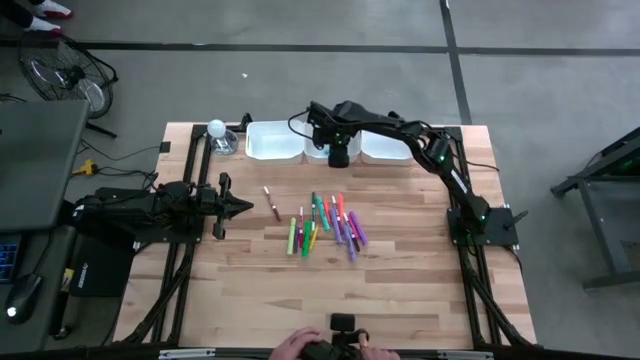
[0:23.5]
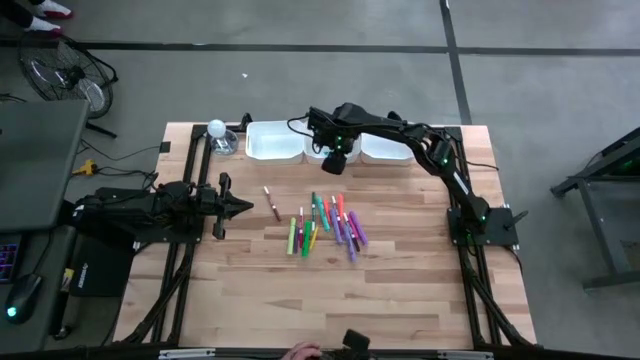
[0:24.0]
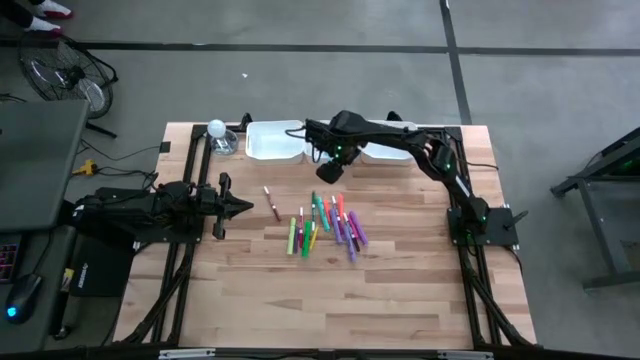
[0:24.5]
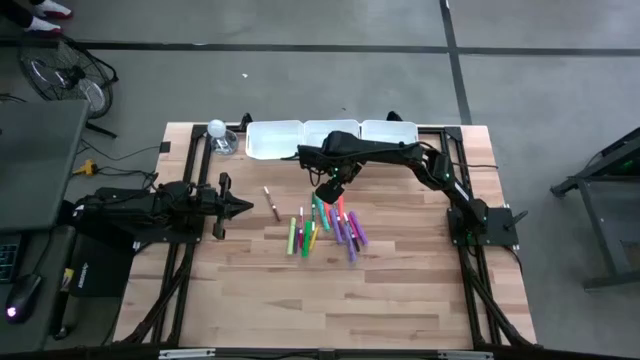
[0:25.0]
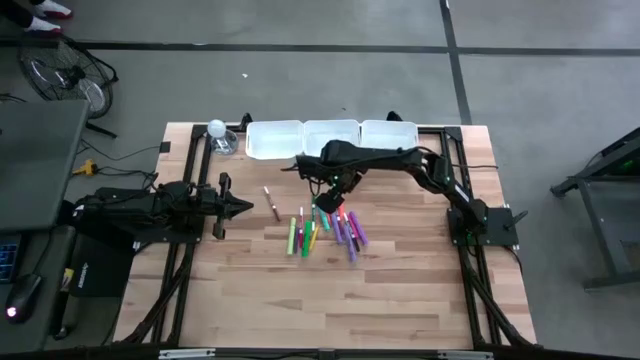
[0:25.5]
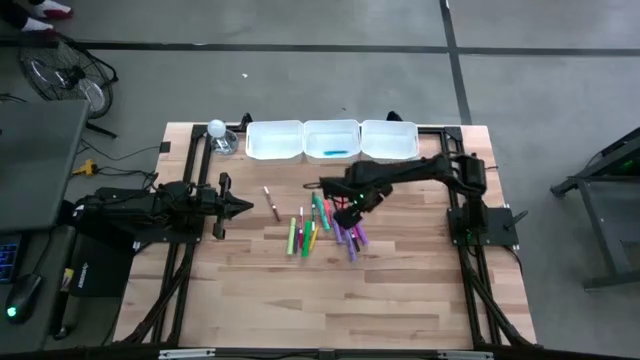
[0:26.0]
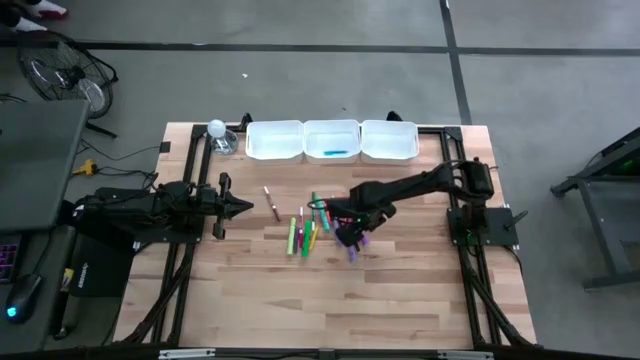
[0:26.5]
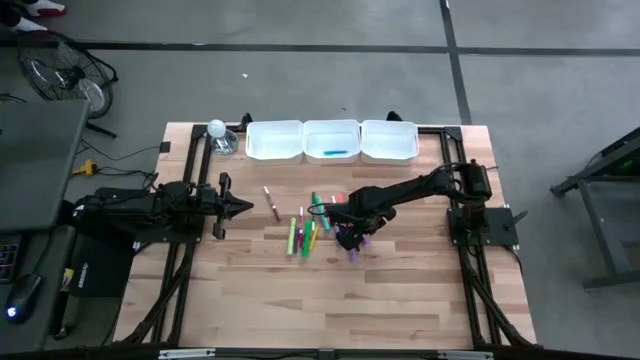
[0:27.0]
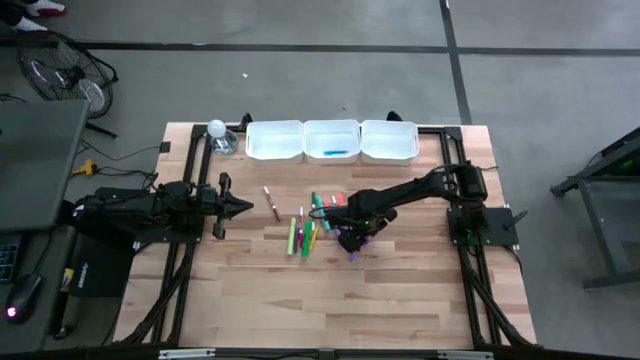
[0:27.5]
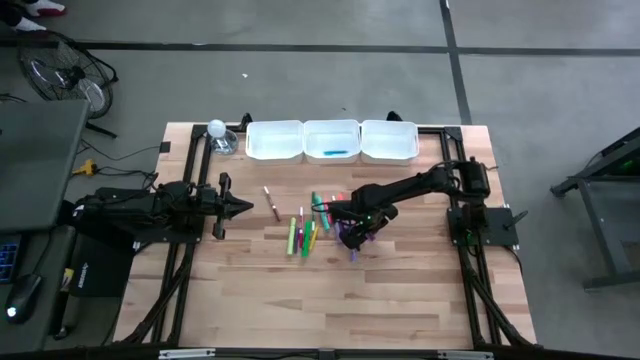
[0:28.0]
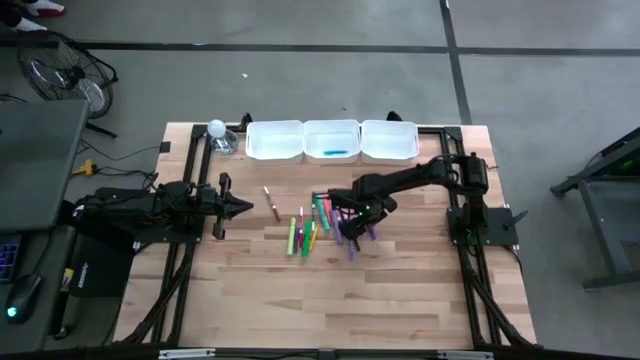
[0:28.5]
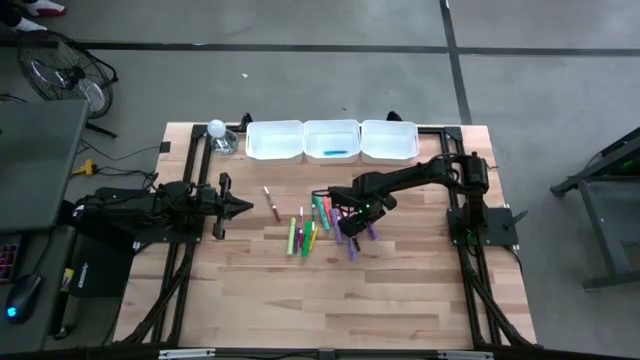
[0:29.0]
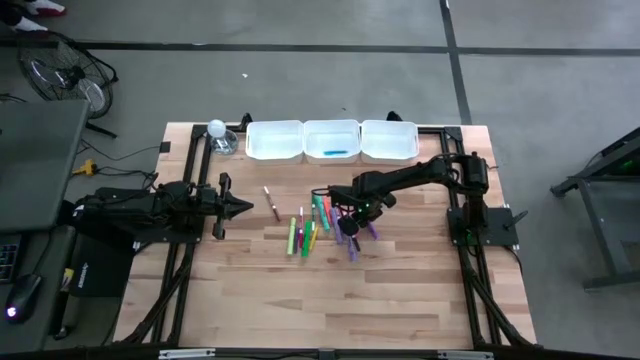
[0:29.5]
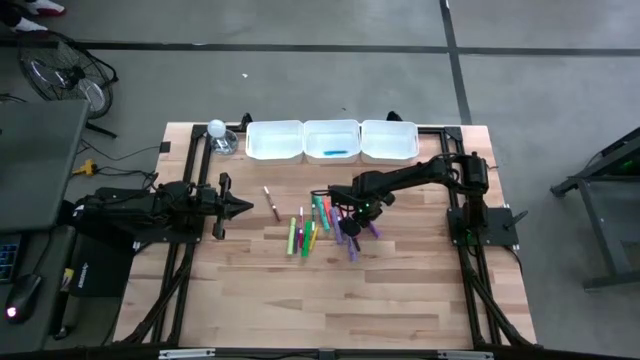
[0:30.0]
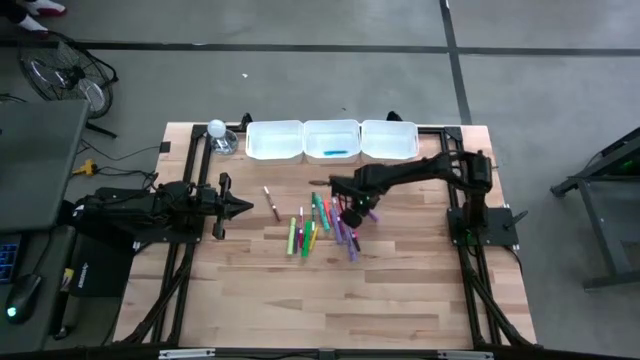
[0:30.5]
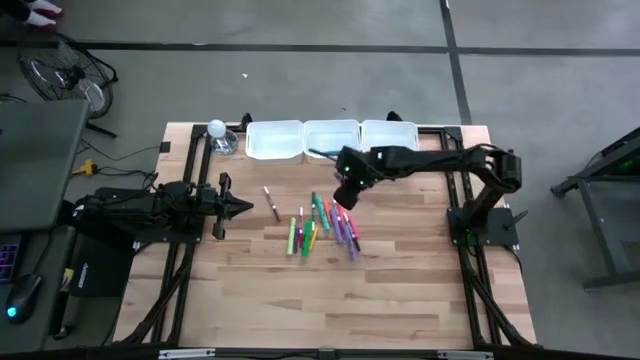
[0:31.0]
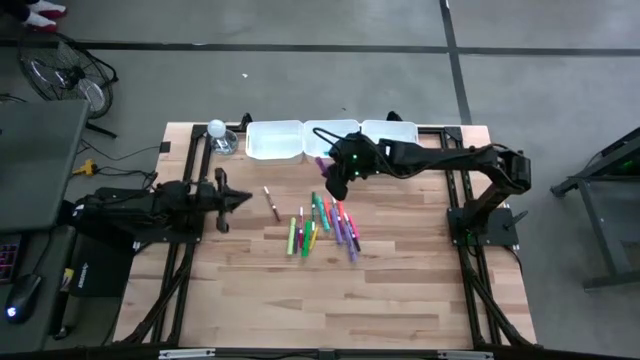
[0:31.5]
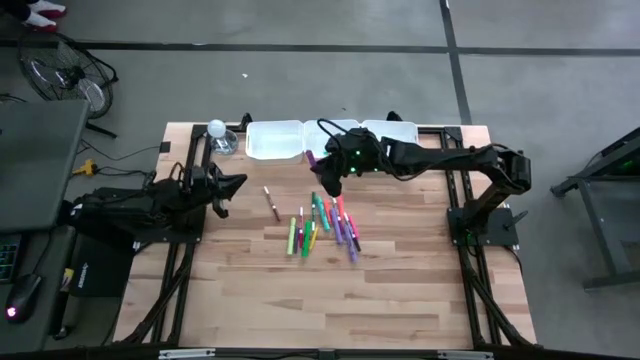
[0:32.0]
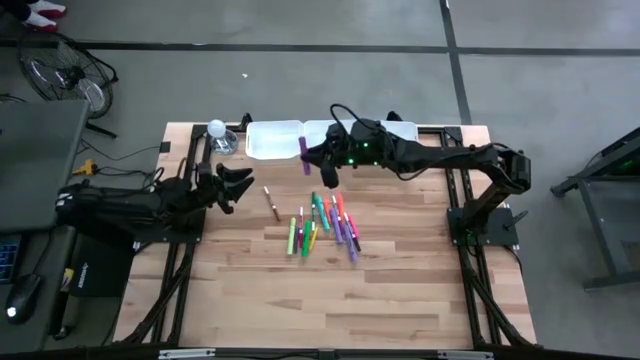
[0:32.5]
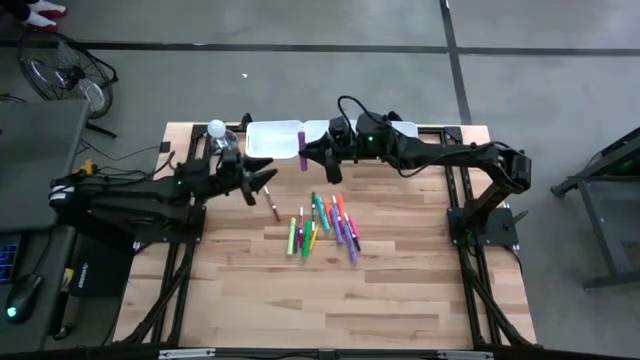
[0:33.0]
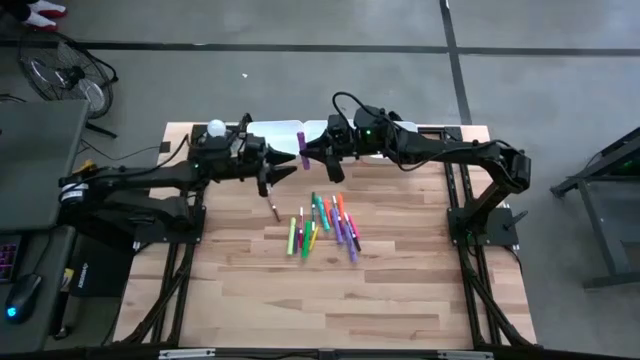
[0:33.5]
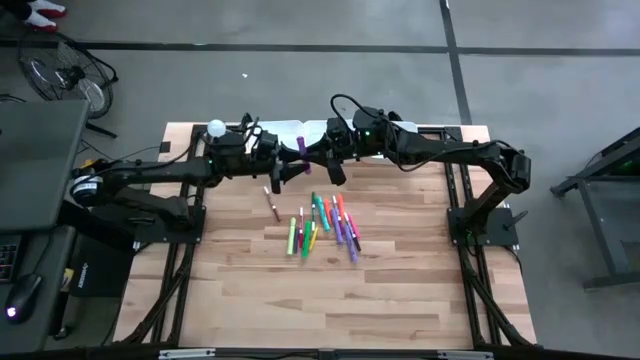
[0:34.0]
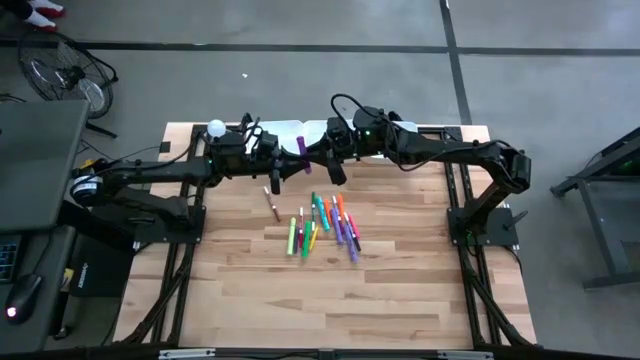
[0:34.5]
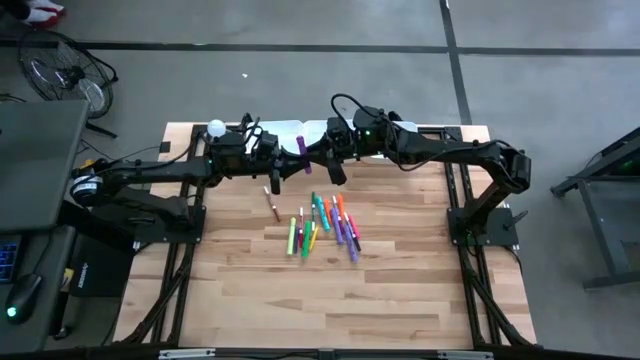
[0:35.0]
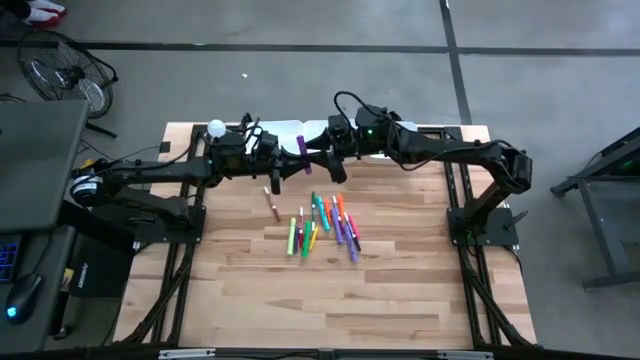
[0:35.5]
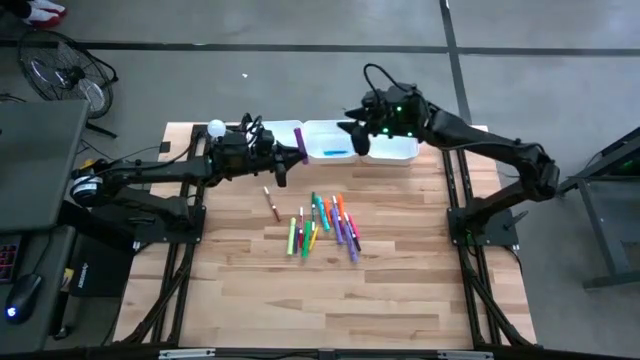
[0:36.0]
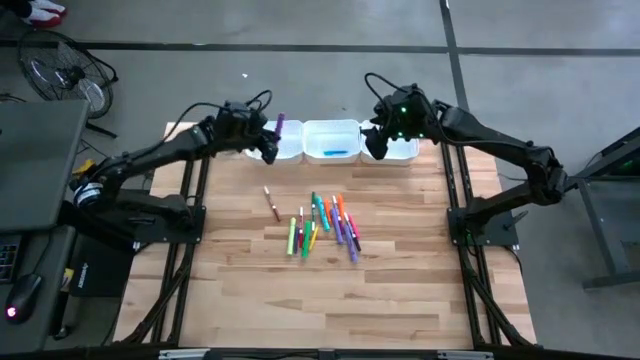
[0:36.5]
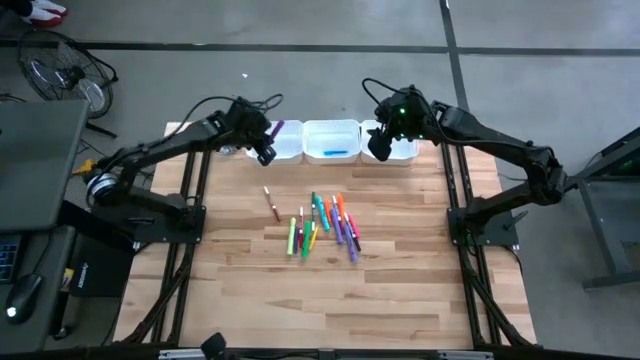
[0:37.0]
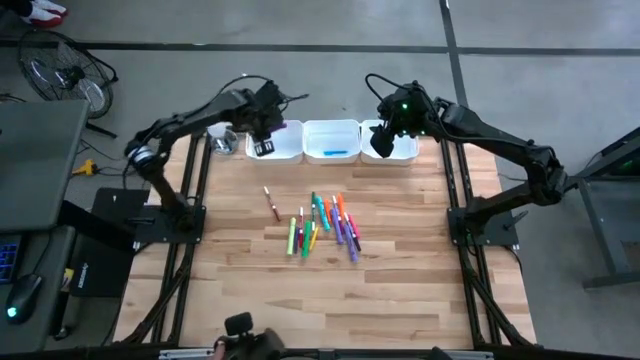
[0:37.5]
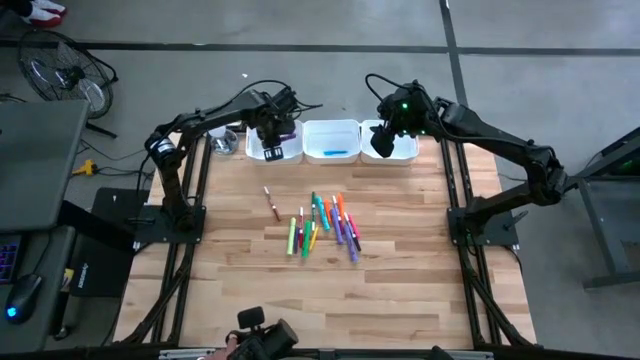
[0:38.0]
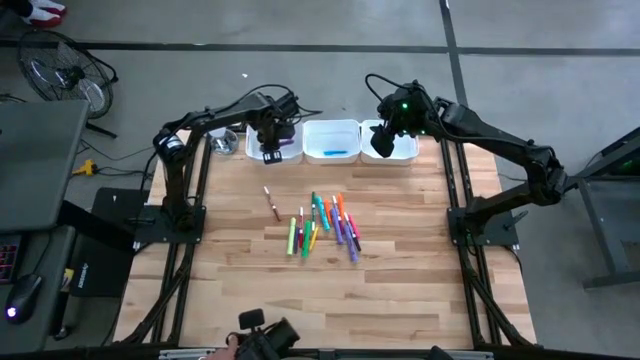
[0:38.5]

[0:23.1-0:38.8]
Task: Pick & Place Markers
Put the light violet highlighter pen into the left white bin

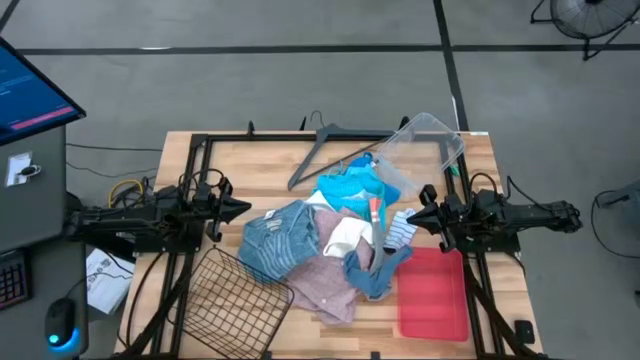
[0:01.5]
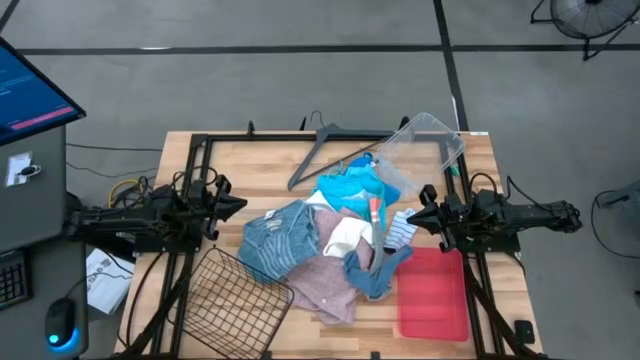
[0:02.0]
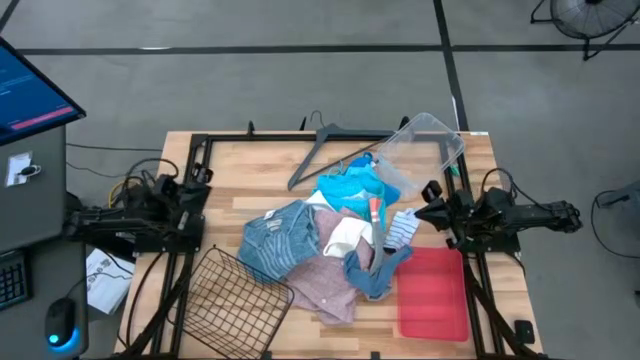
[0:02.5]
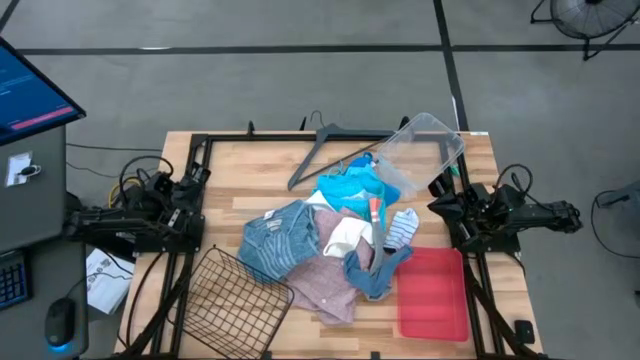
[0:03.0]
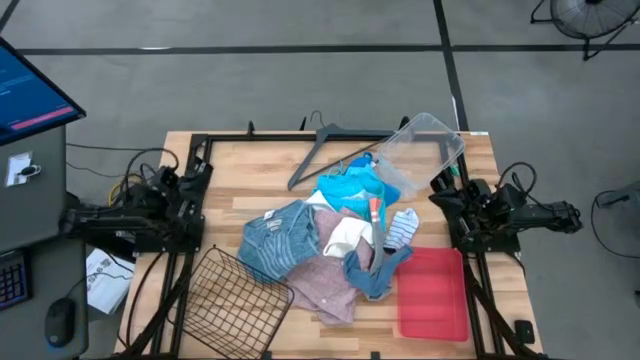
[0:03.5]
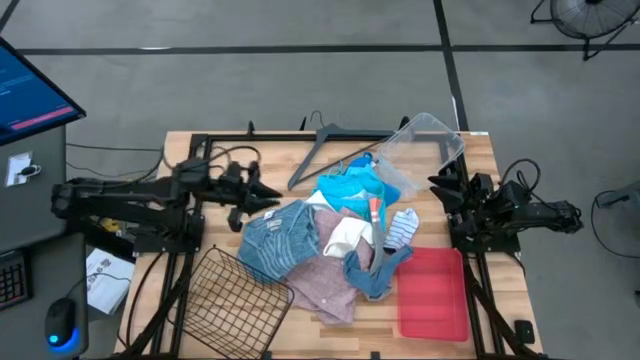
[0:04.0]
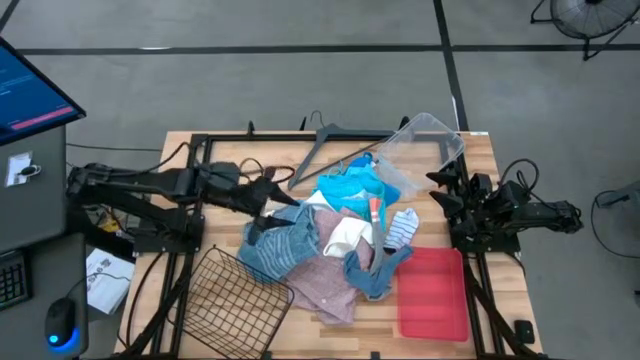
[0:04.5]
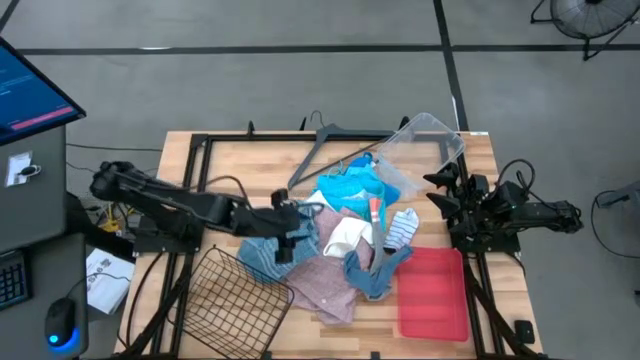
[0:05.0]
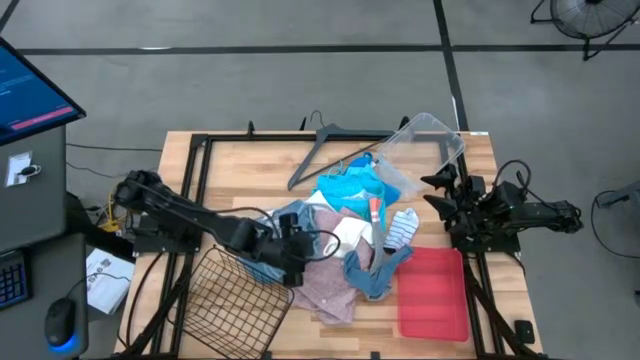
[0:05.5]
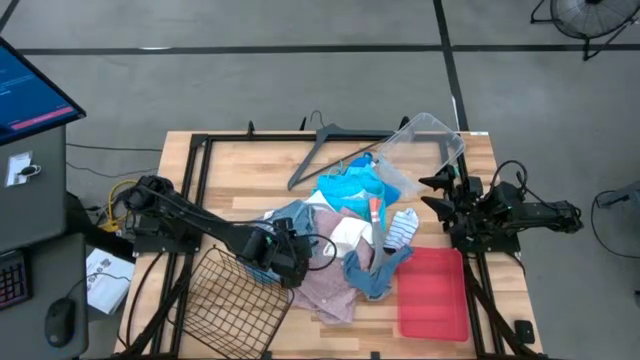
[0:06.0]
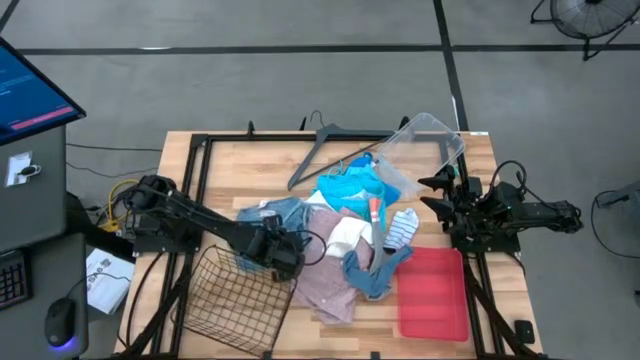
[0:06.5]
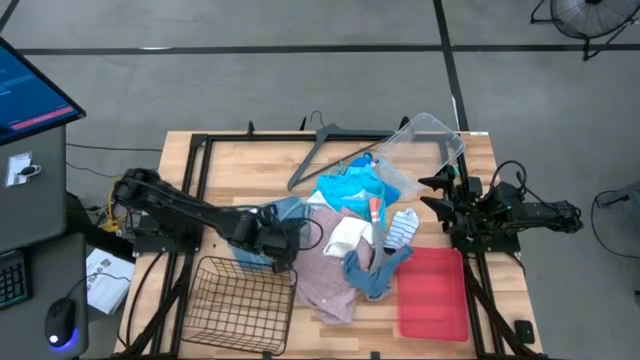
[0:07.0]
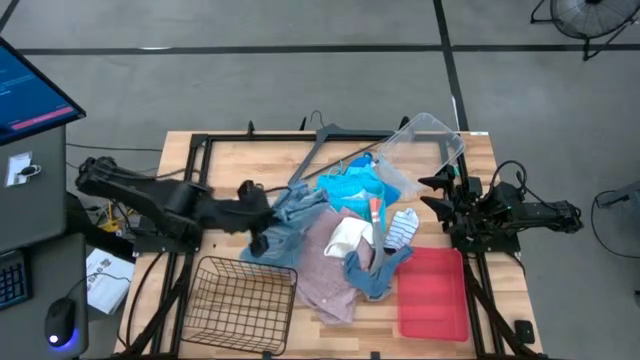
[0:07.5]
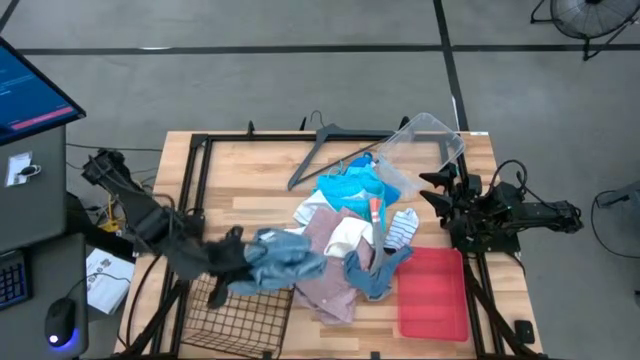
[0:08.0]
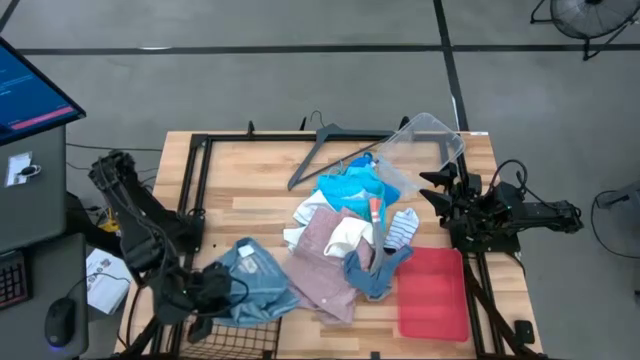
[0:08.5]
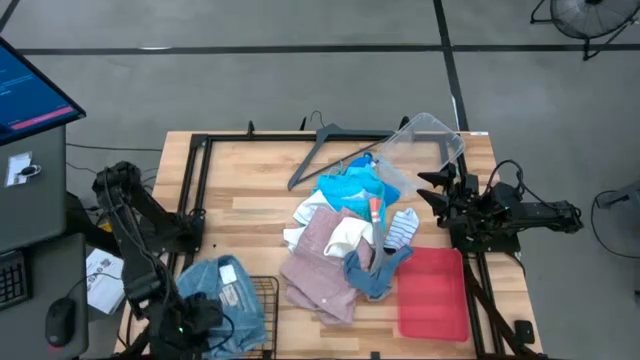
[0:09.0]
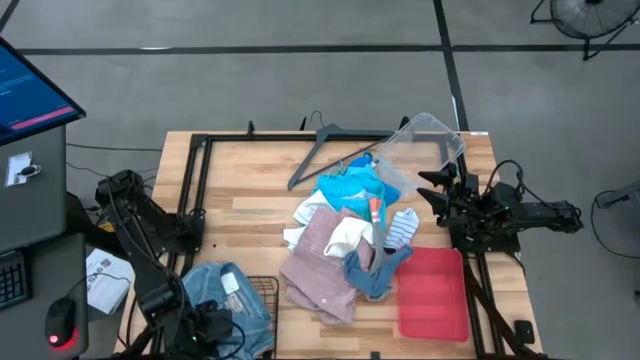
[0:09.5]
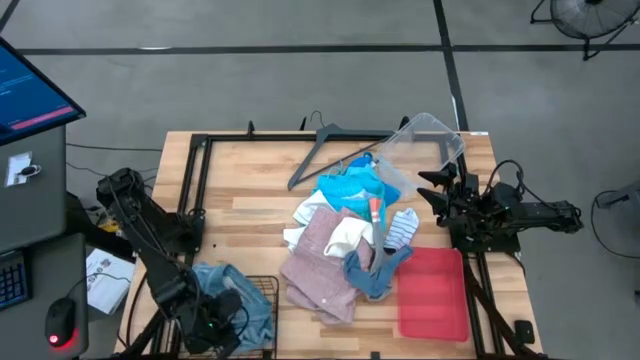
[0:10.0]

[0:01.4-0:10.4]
Task: Pick & Place Cloths
Put the blue polo shirt into the wire basket
